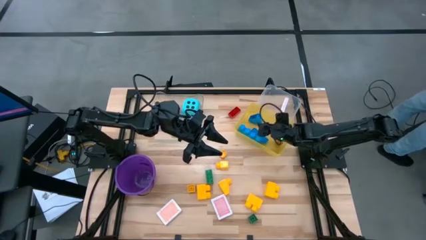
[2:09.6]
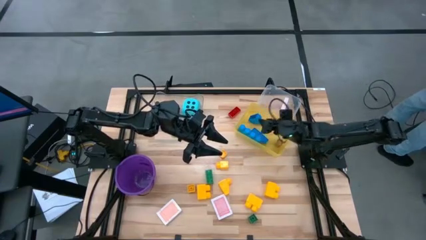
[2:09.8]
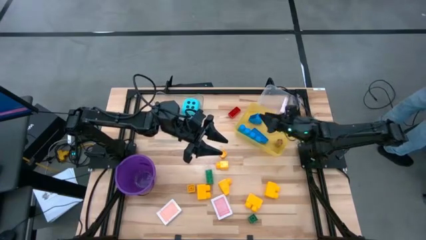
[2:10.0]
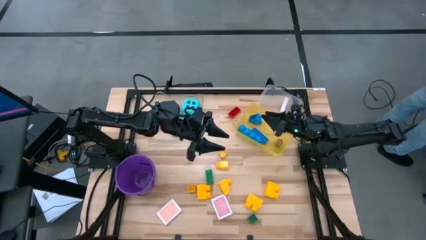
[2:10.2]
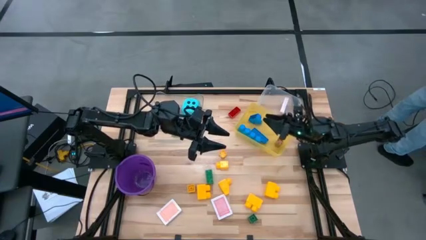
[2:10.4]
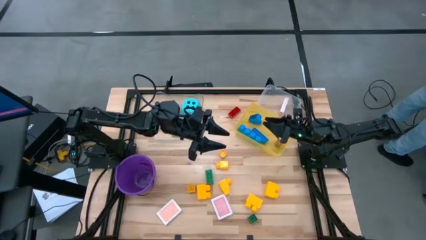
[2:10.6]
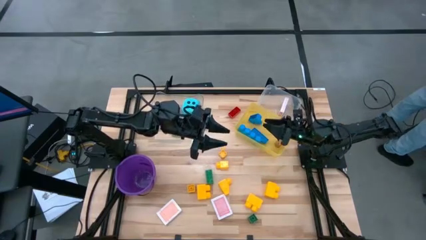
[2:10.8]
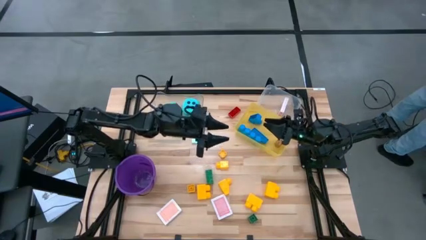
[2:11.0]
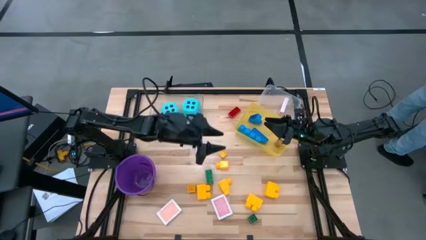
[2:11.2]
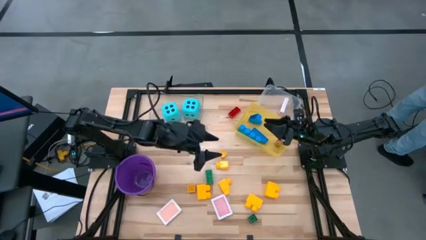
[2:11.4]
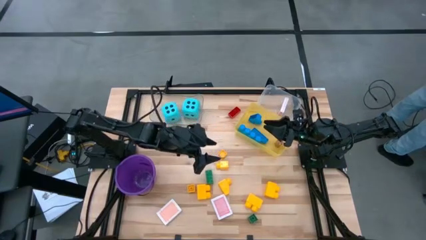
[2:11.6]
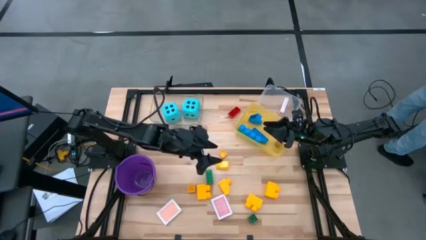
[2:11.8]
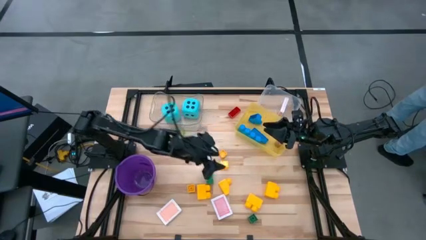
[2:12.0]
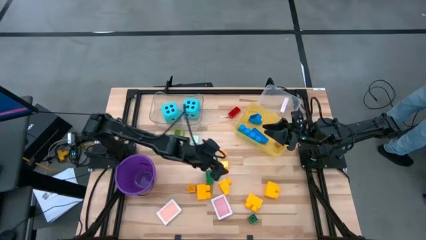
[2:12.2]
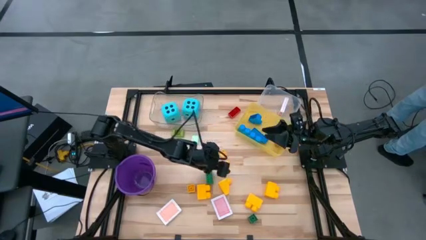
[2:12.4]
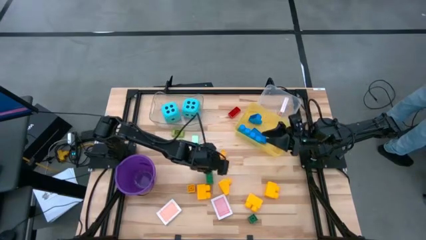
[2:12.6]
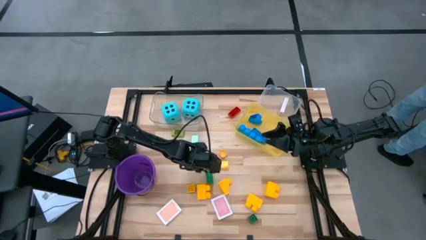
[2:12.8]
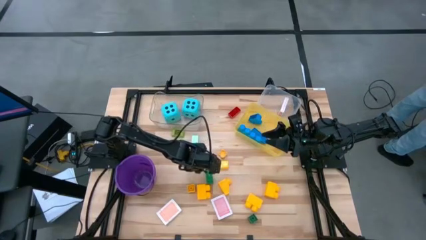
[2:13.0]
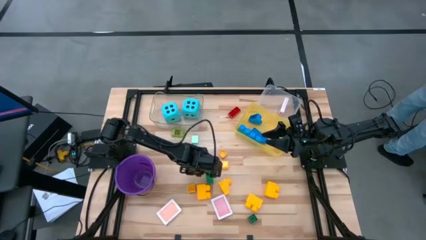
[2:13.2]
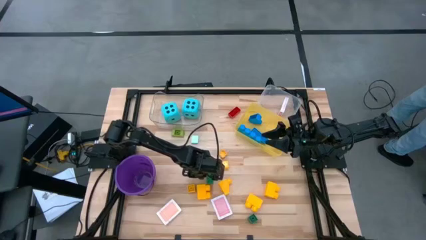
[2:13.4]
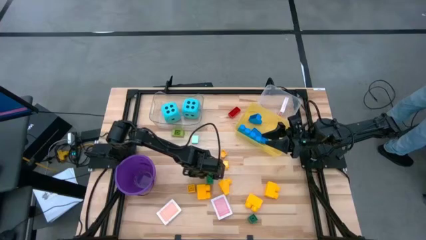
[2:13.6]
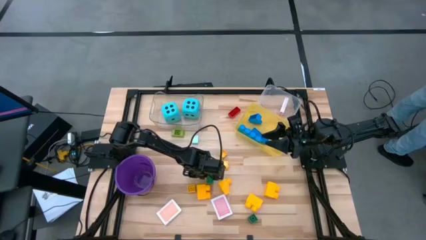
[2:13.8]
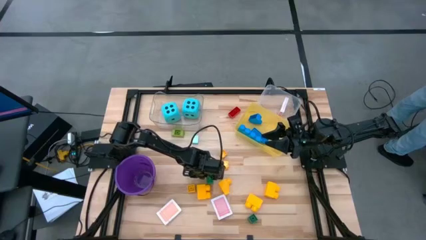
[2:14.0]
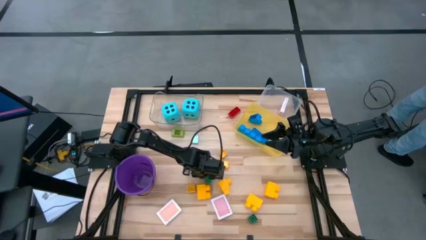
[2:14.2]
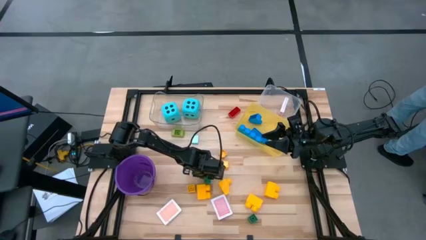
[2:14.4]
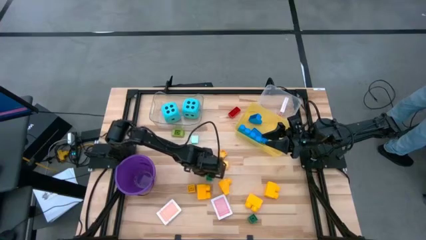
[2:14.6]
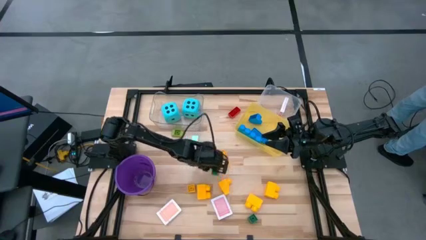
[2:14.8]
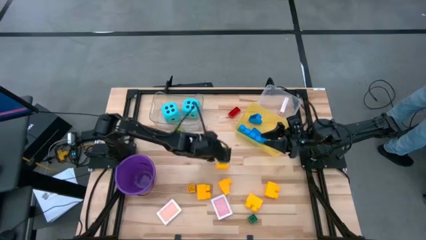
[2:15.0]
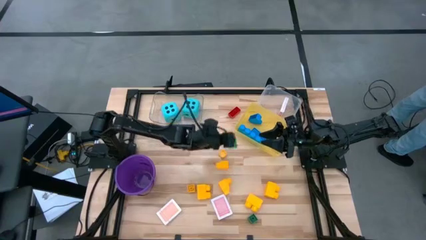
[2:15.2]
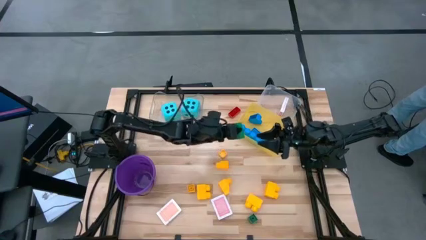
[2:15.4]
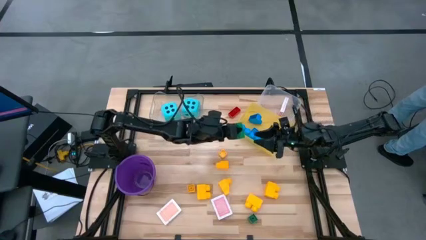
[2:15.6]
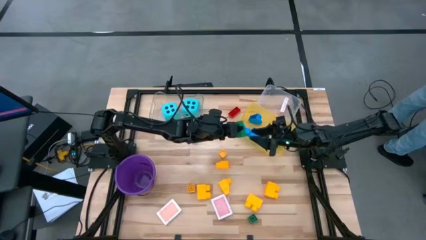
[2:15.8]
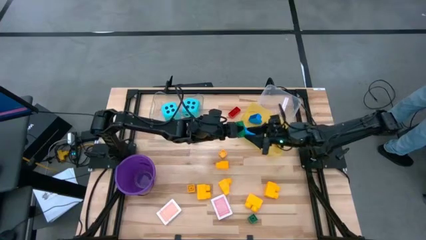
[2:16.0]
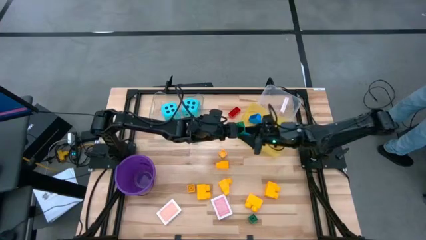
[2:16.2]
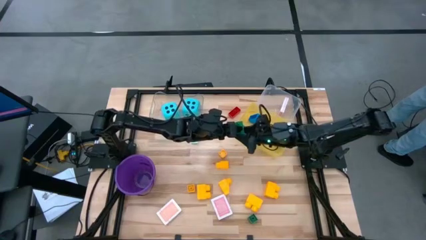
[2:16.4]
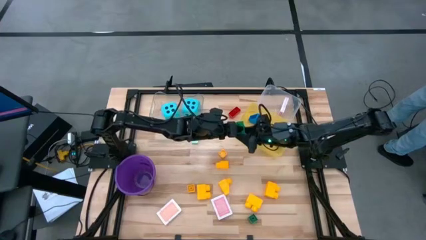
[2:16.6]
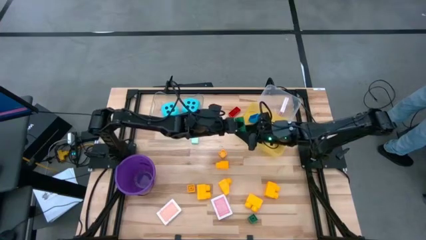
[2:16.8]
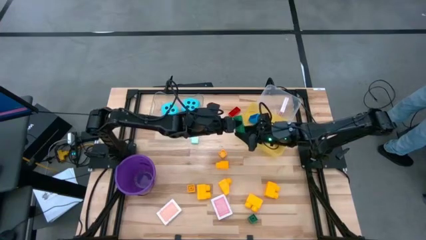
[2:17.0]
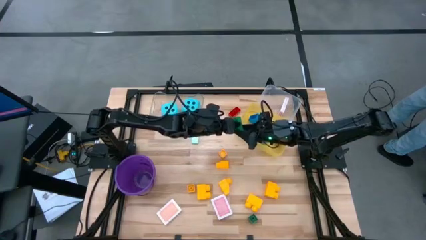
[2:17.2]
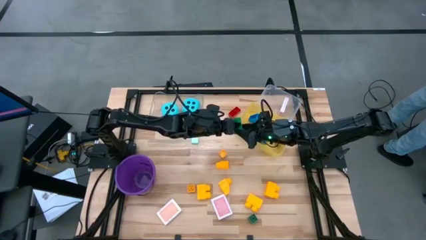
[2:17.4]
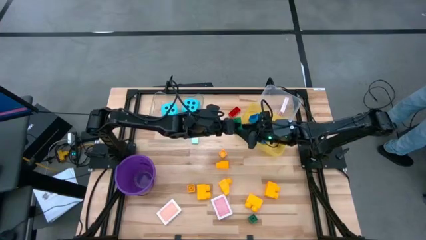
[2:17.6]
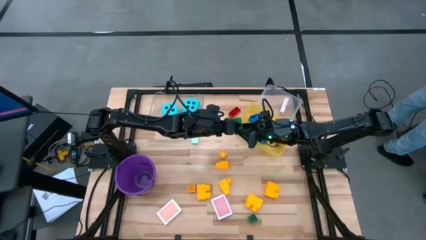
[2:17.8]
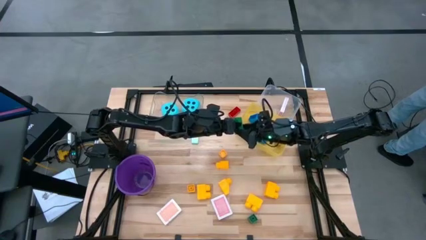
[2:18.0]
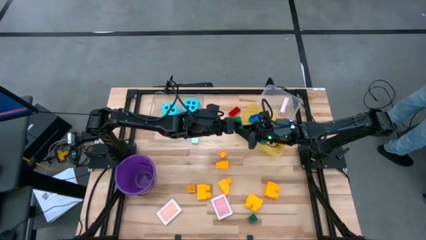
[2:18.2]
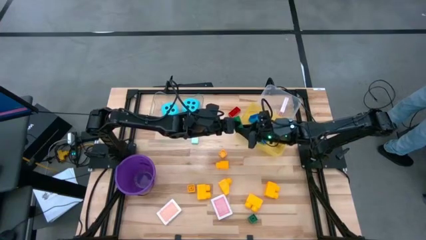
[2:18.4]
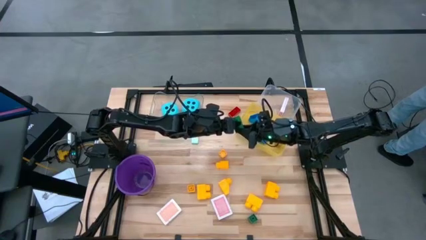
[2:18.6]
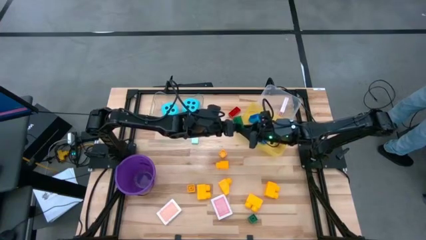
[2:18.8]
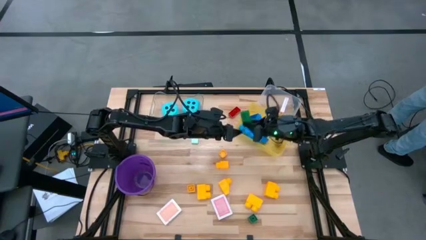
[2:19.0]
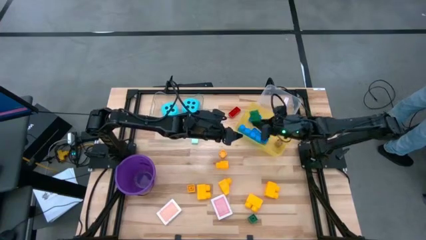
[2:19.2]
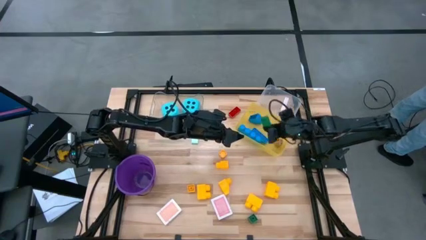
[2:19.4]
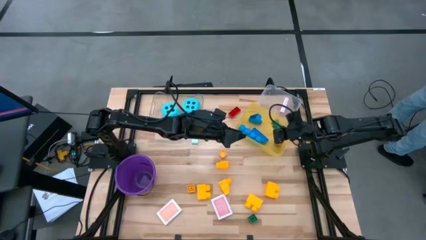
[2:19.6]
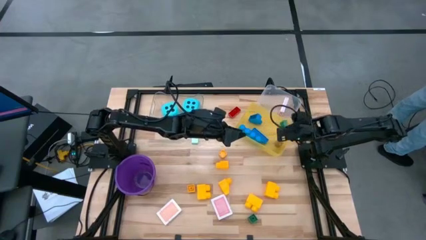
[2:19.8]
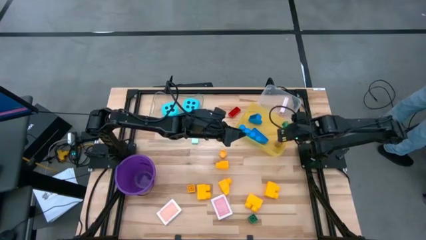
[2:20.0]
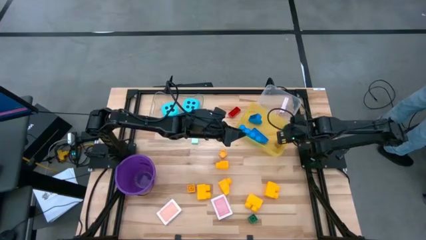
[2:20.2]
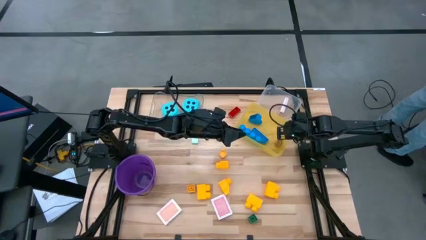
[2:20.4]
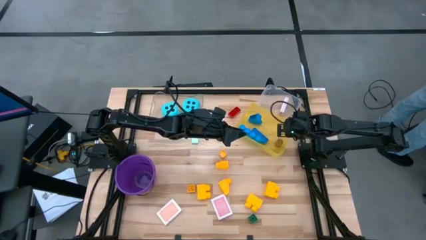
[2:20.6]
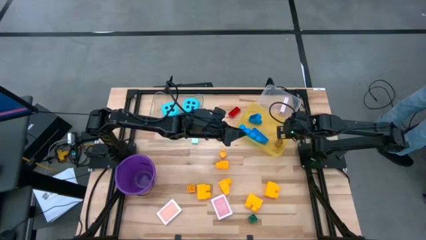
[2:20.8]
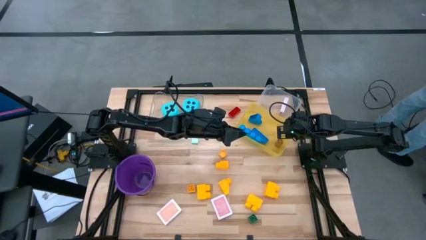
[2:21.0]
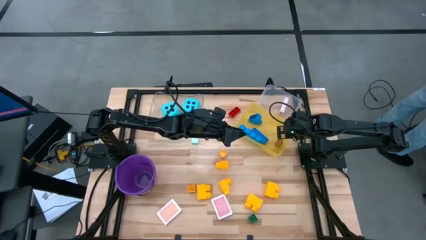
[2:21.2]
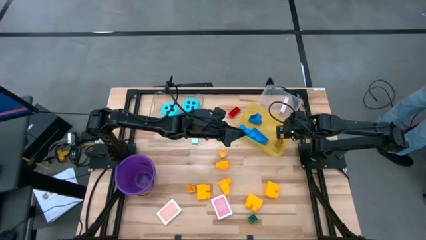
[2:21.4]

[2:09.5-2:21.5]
Task: Pick & Place Toys
Put the green game piece into the yellow bin
